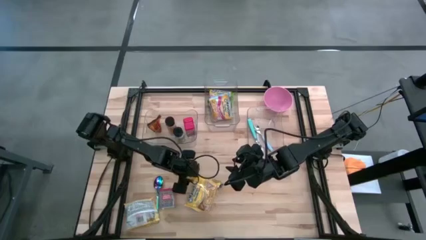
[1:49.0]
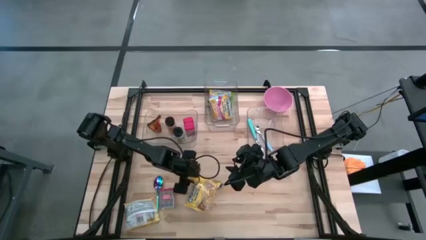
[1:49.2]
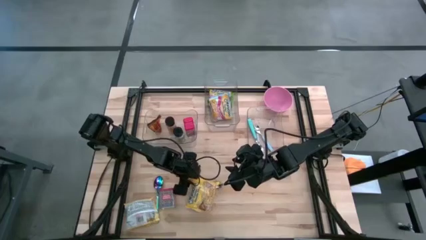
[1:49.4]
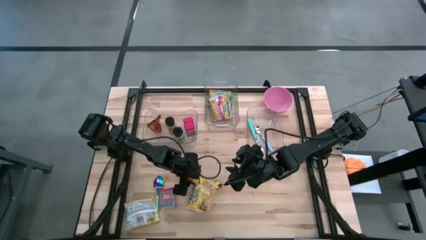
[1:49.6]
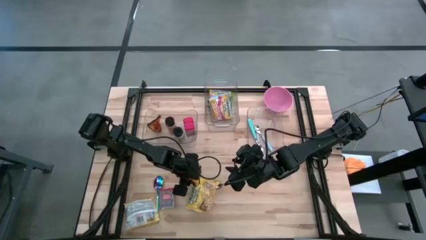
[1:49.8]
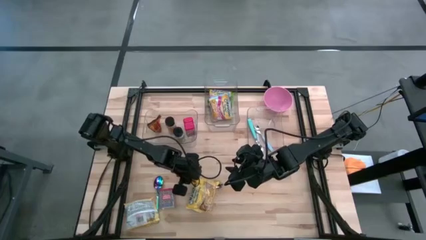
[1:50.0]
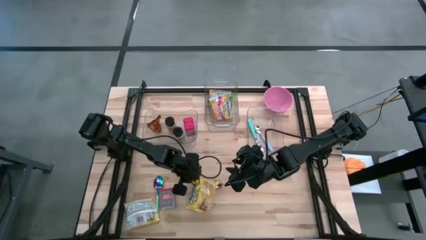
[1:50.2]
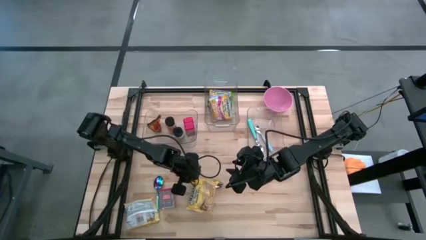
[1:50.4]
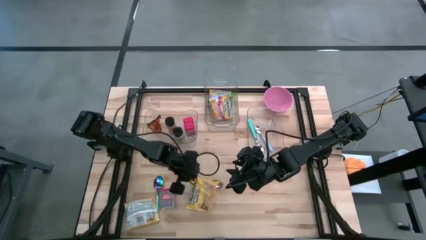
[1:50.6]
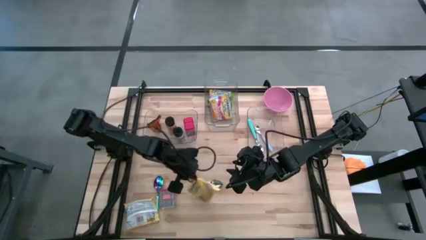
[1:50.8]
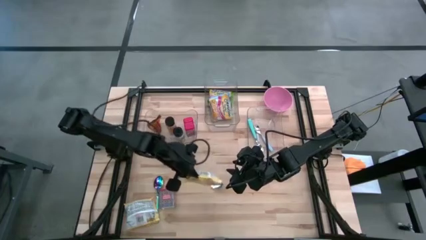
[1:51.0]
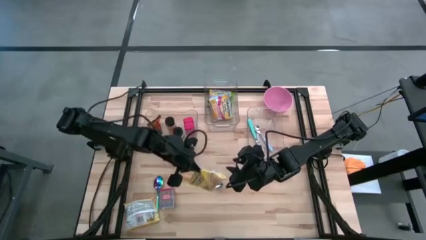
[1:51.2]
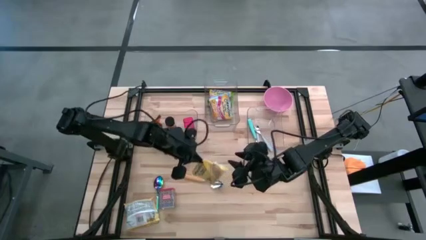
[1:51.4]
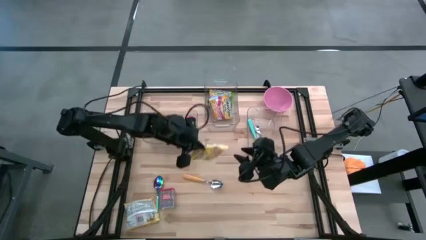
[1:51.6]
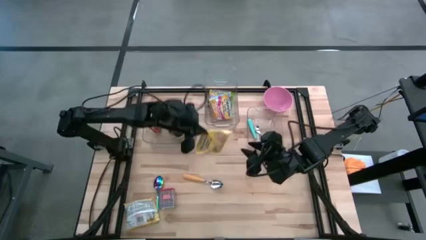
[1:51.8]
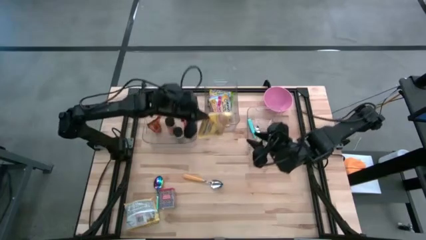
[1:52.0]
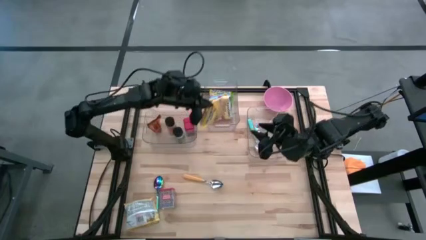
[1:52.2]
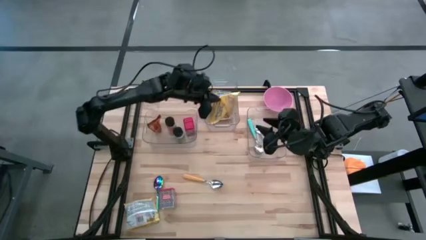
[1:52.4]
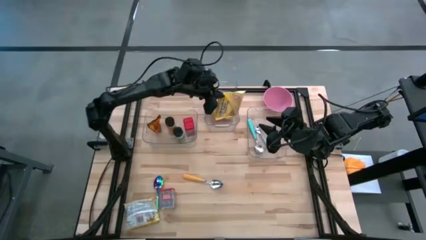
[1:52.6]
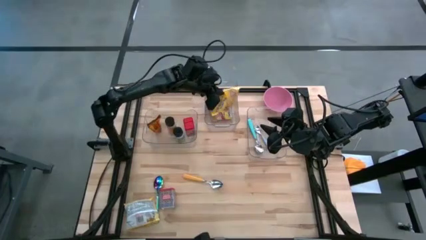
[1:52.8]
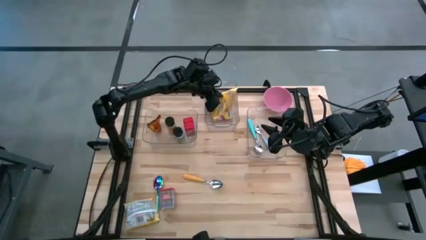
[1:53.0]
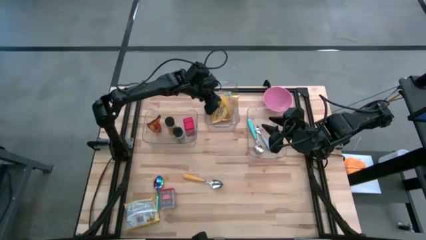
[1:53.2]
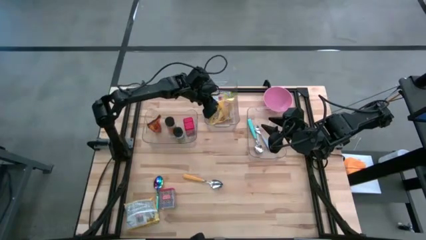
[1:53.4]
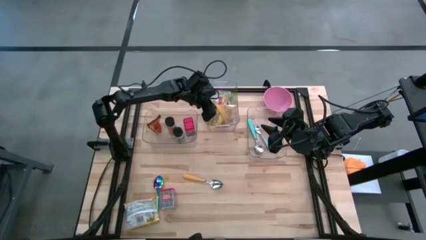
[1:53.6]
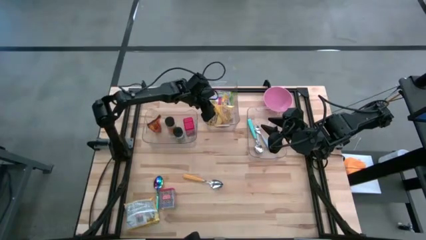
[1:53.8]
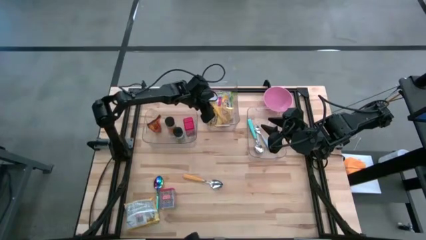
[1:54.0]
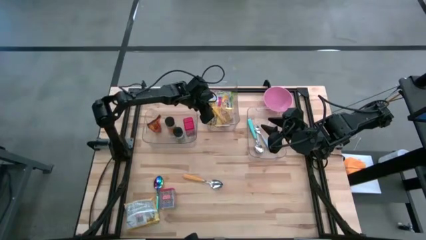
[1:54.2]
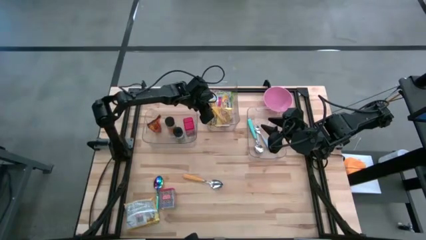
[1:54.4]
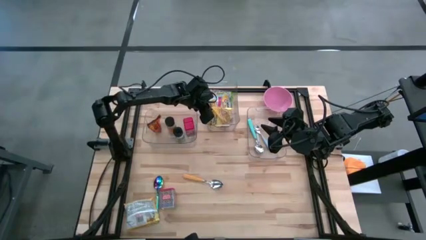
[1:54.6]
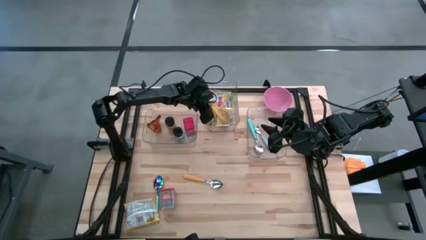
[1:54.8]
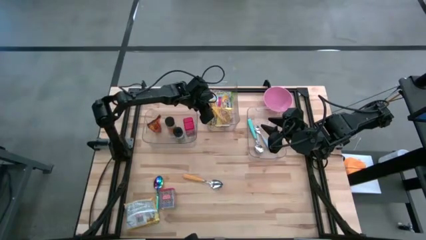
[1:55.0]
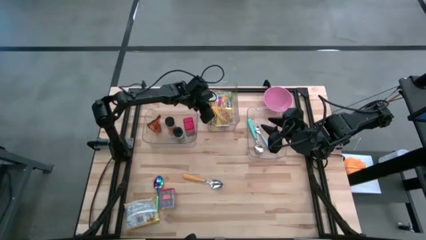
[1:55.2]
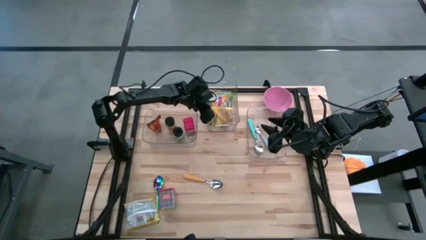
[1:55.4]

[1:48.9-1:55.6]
Put the right yellow noodle pack into the middle transparent bin

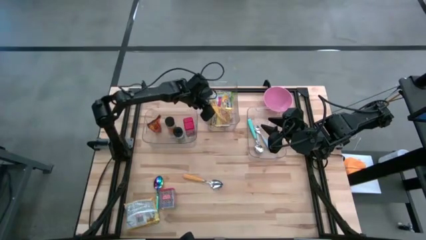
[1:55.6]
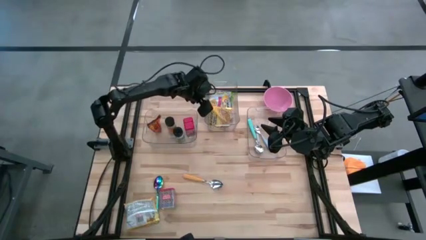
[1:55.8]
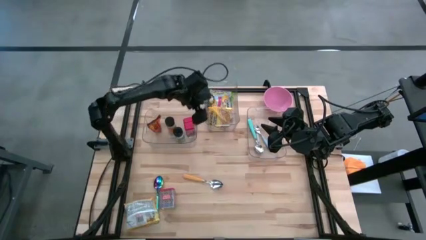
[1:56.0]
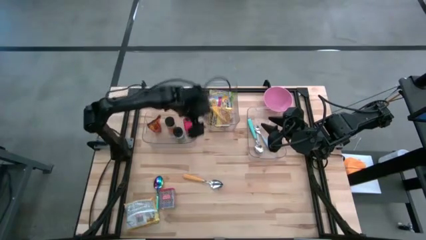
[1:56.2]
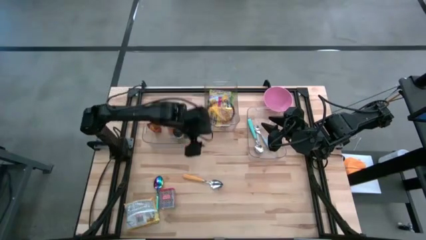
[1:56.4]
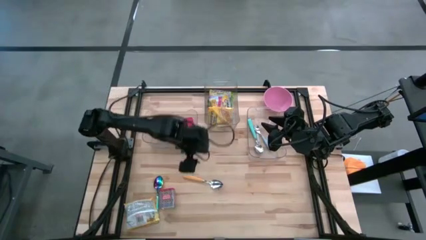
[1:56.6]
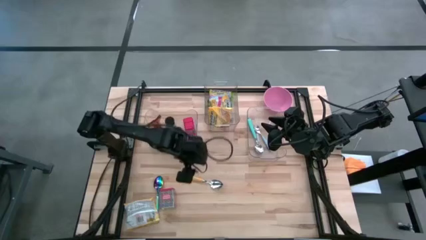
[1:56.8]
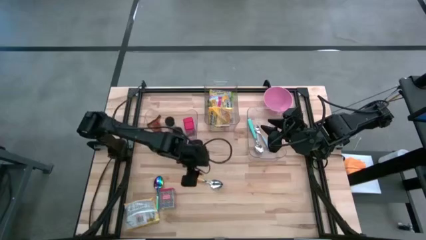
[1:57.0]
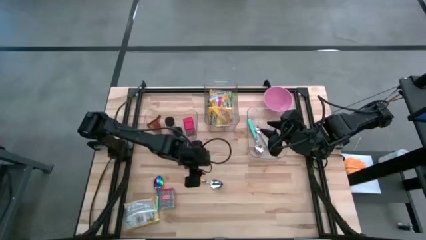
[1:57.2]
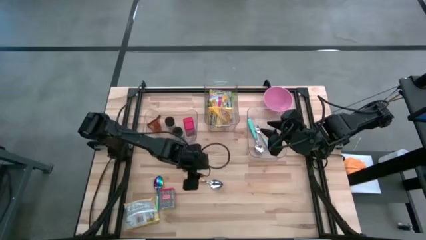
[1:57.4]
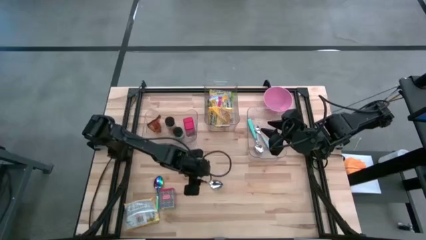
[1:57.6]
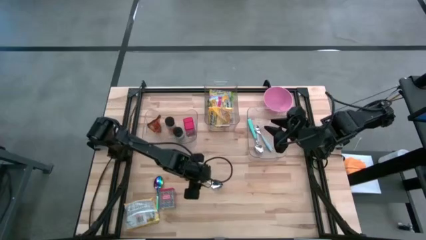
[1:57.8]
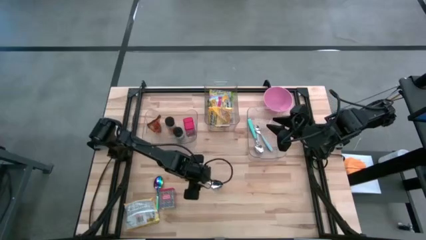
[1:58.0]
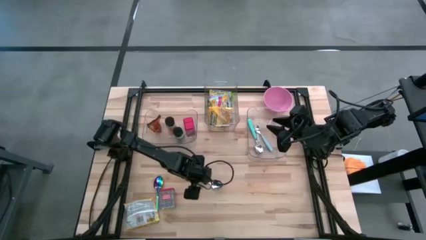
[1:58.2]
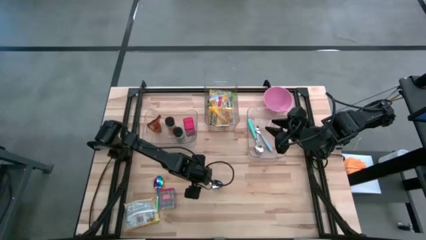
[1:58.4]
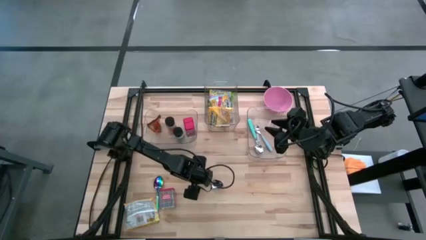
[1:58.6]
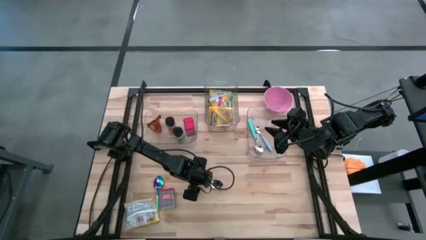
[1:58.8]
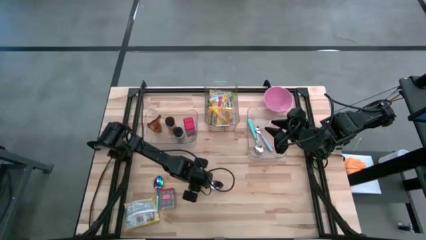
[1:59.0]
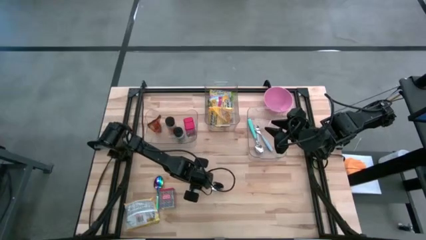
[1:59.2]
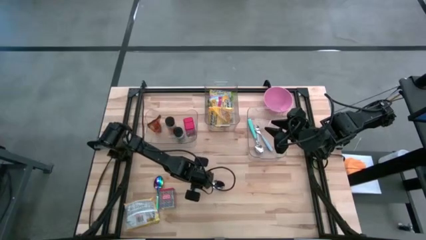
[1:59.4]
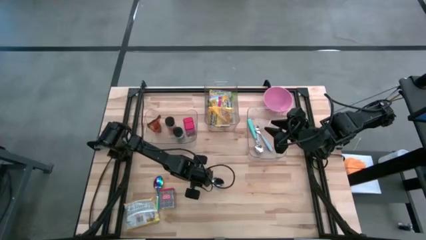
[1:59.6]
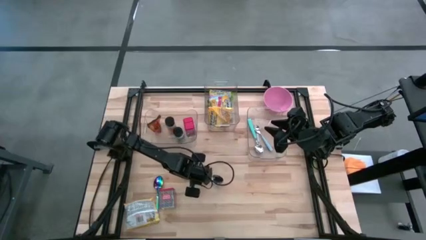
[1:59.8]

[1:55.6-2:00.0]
Put the yellow spoon into the right transparent bin
